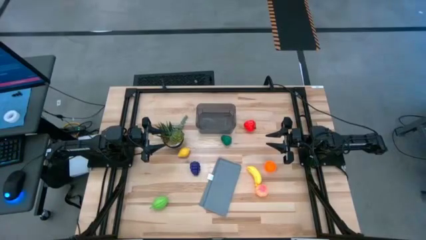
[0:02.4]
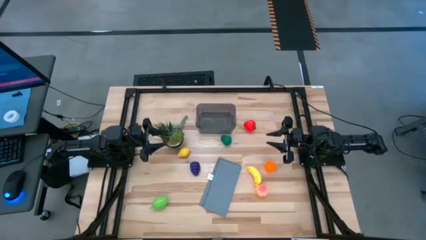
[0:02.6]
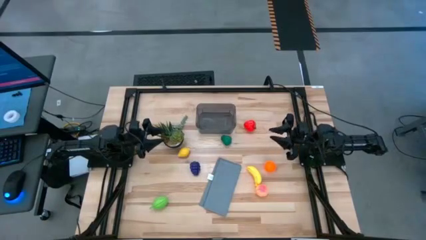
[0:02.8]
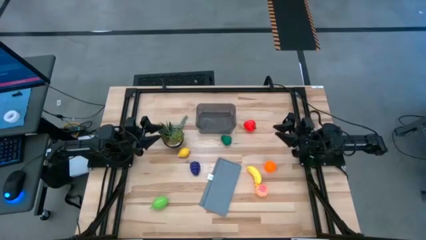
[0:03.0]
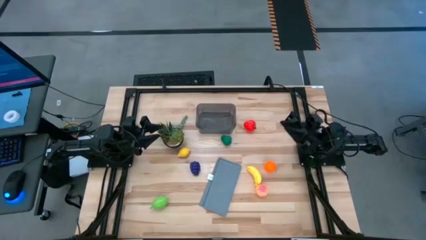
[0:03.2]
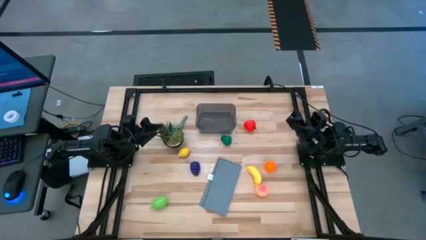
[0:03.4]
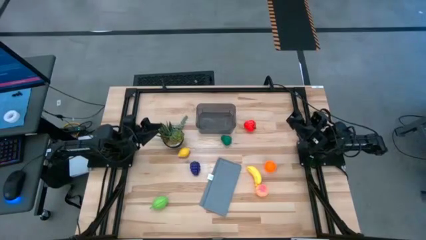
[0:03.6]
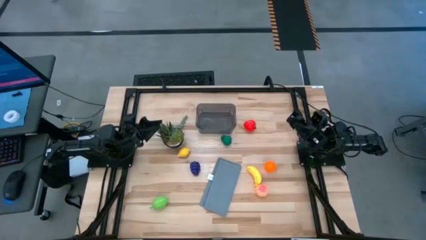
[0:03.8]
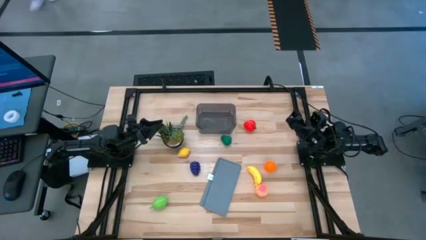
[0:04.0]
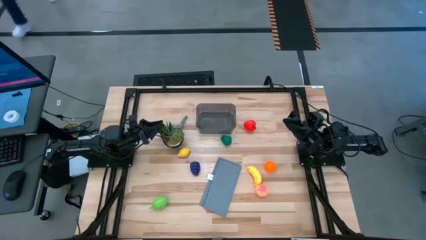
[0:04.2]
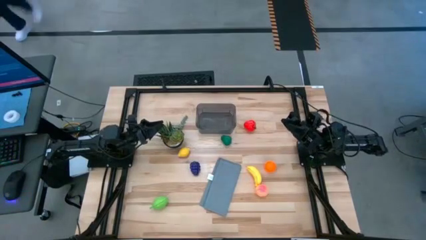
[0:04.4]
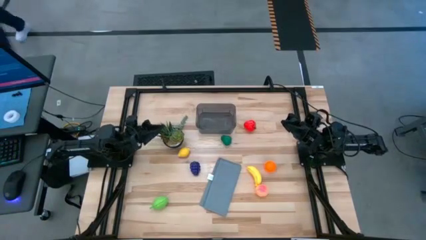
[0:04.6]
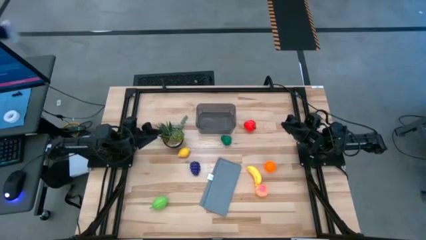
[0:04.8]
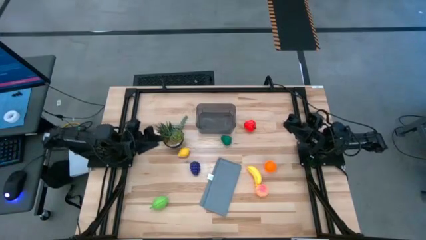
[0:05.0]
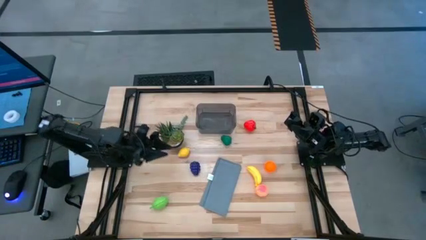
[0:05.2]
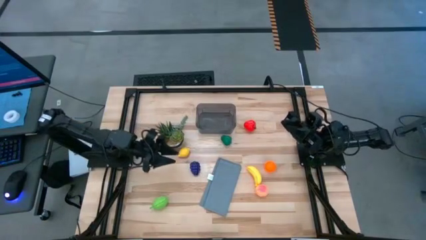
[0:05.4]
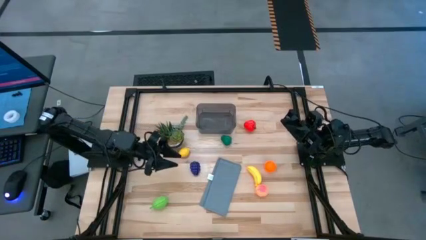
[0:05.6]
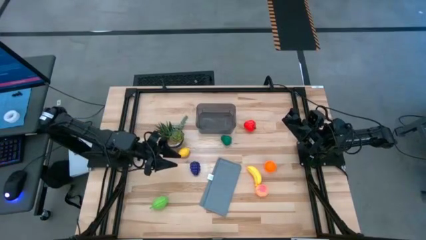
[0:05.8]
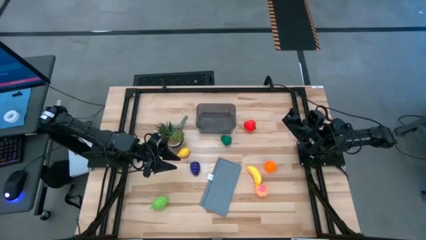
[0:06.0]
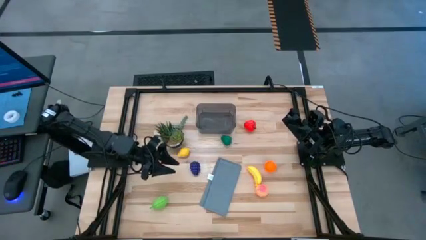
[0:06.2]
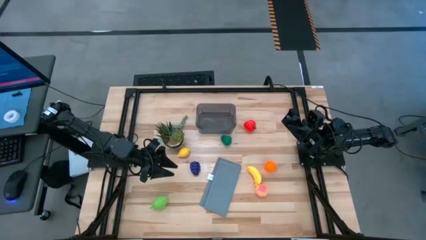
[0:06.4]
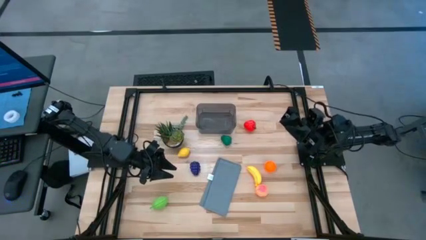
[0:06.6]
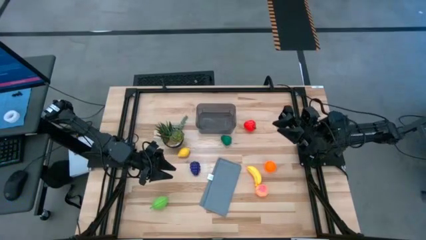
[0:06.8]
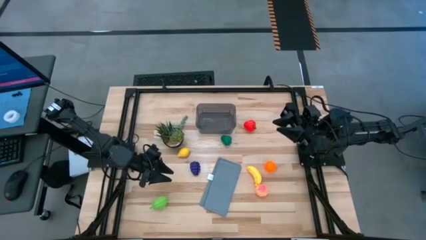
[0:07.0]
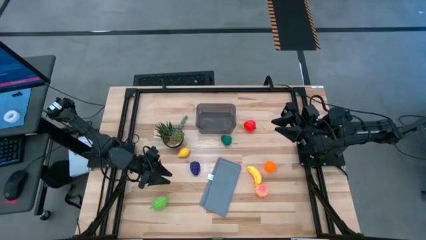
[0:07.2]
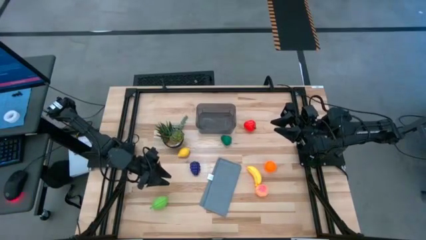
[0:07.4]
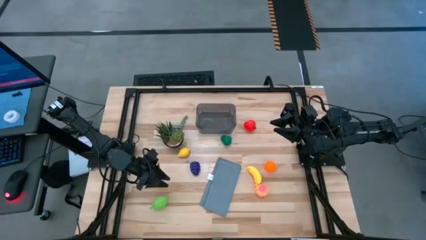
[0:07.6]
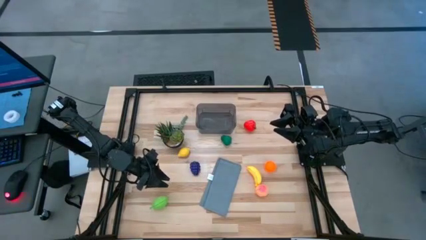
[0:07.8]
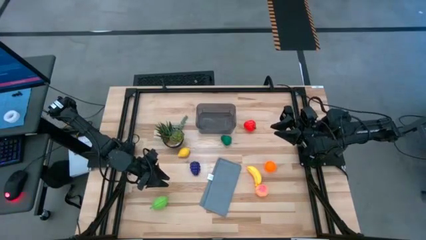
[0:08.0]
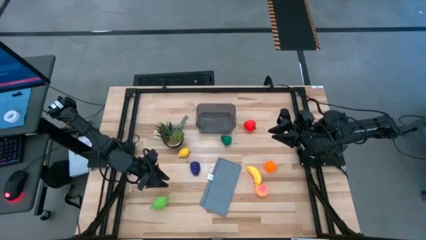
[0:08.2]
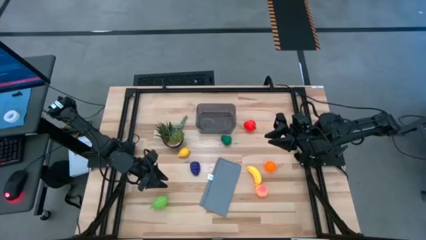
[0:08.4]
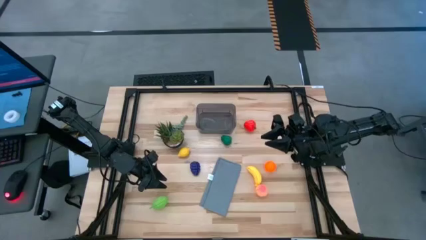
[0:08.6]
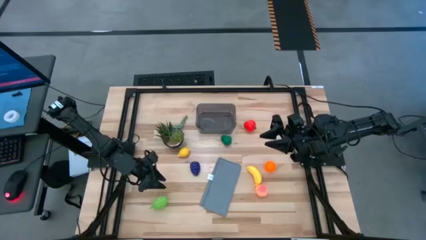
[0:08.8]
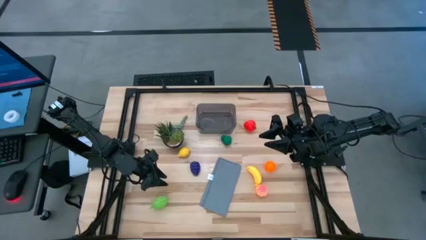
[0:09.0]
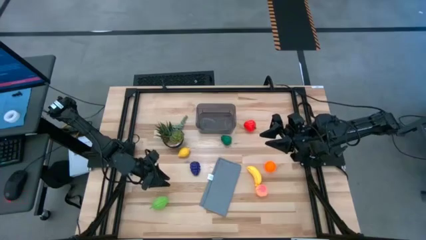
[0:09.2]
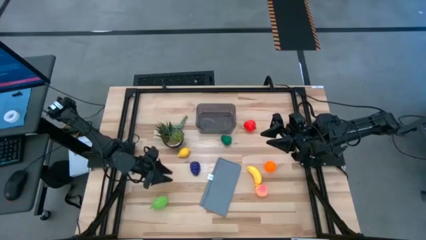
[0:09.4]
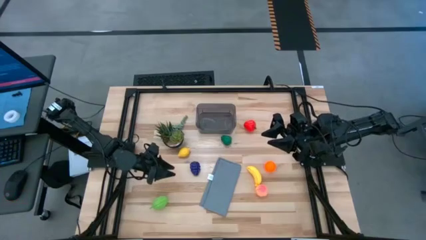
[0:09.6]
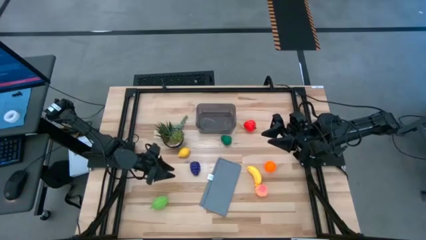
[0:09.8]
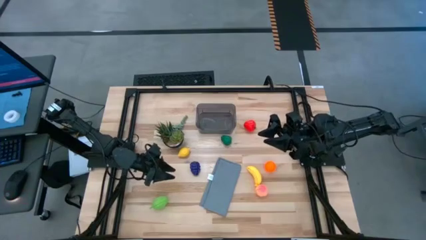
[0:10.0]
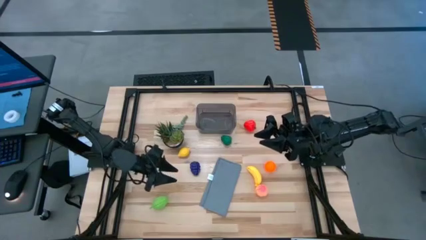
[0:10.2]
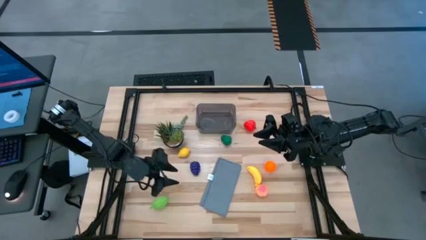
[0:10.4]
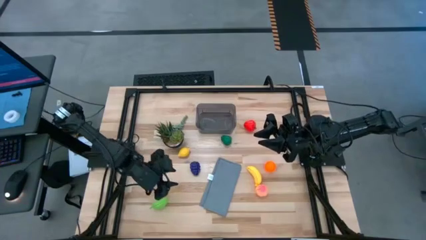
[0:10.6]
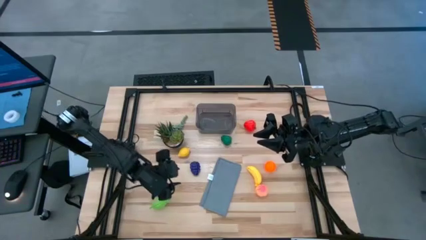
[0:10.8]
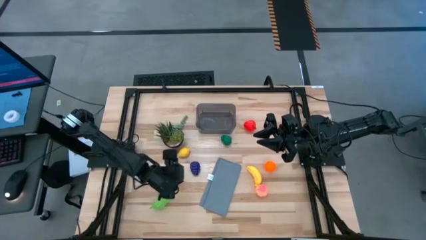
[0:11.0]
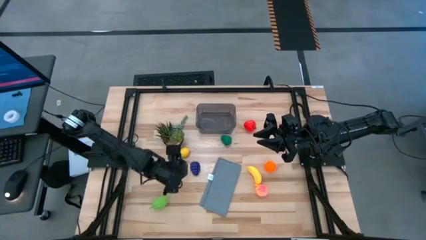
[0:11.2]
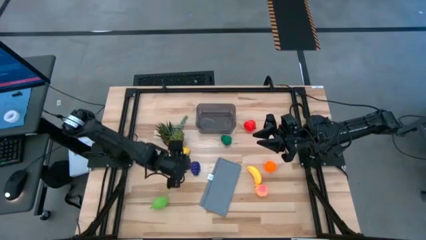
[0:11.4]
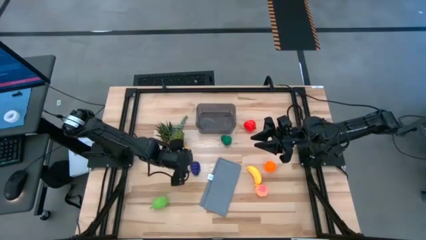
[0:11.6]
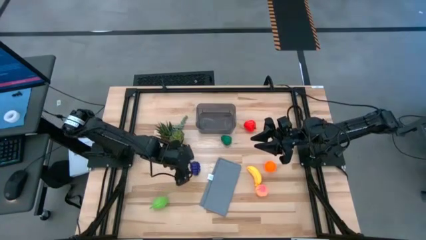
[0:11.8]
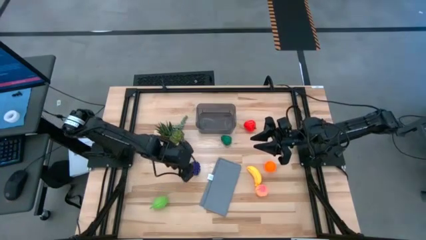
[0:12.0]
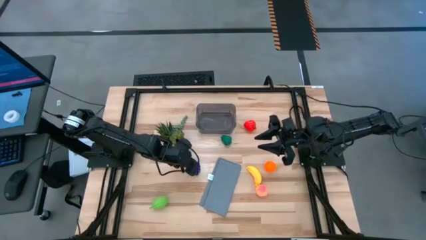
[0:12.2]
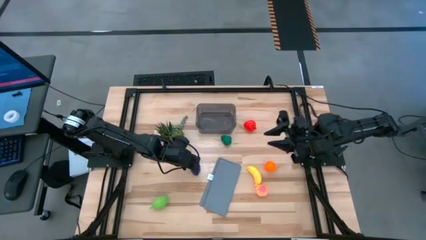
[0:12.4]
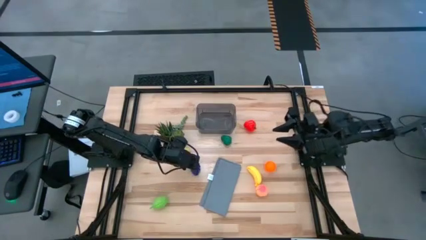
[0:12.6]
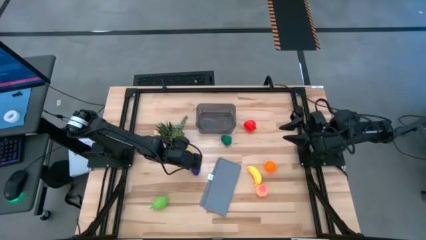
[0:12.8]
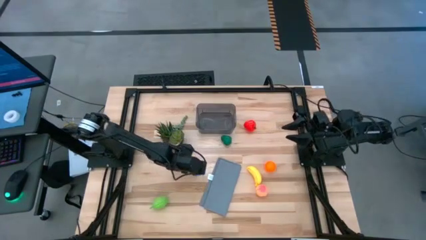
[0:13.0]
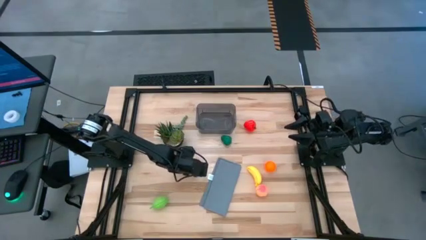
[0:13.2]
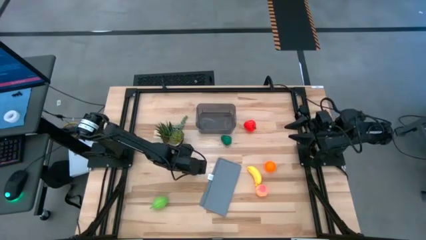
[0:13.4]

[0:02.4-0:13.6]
Task: Pick and placing Produce into tupperware
Put the grapes into the black bin
